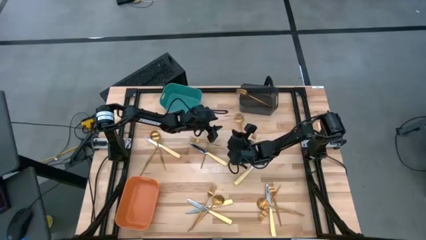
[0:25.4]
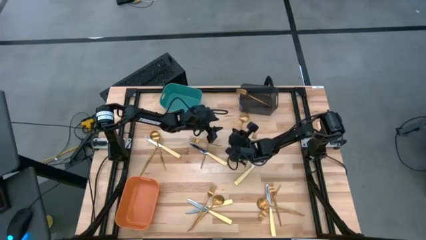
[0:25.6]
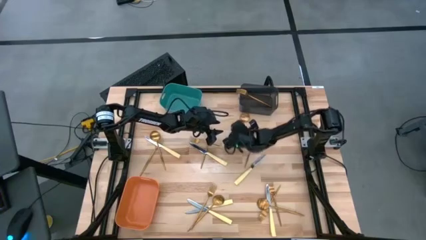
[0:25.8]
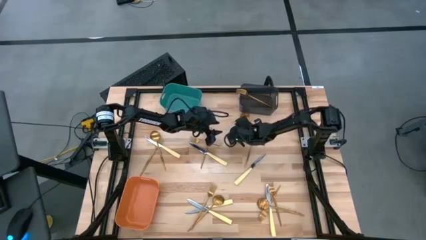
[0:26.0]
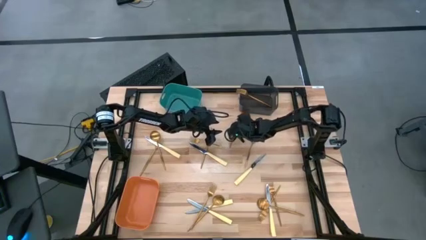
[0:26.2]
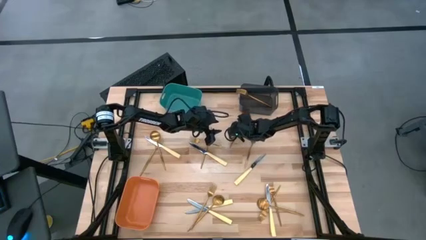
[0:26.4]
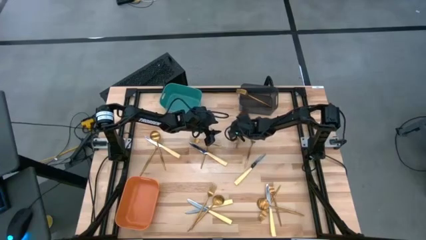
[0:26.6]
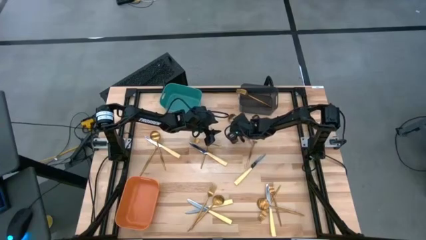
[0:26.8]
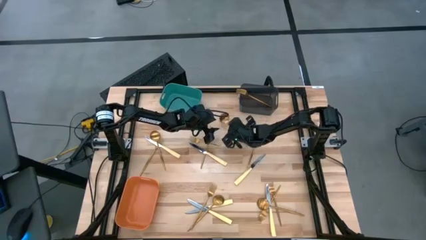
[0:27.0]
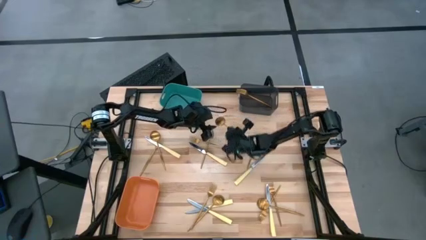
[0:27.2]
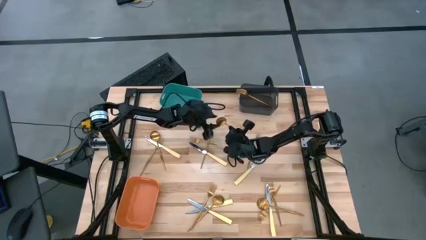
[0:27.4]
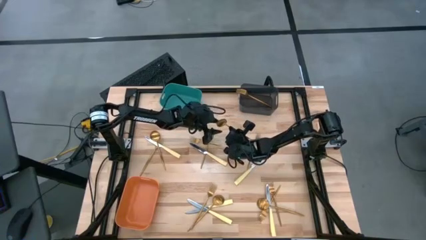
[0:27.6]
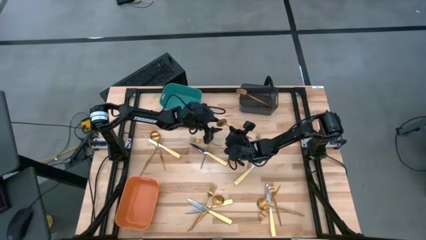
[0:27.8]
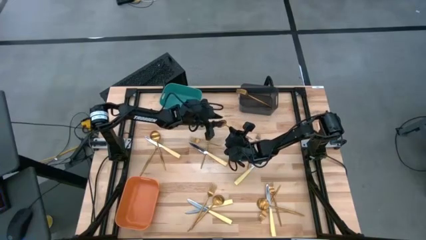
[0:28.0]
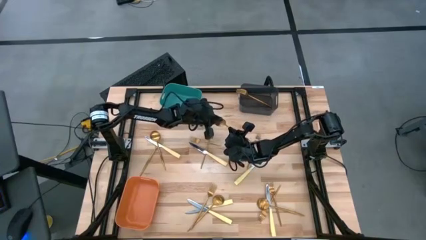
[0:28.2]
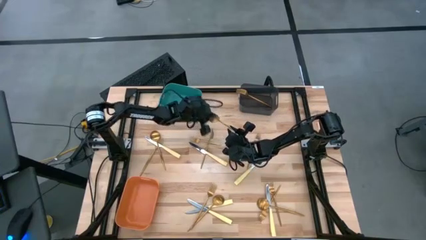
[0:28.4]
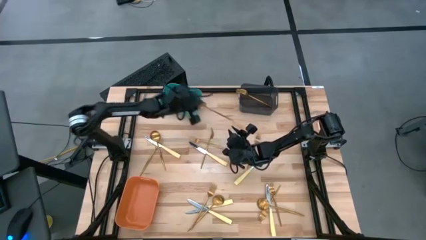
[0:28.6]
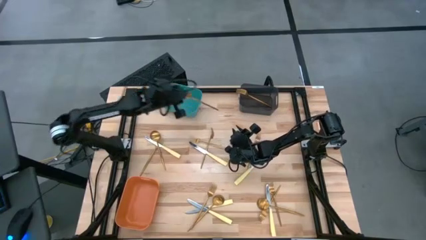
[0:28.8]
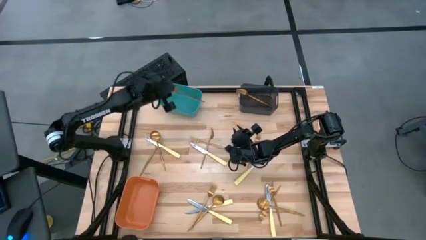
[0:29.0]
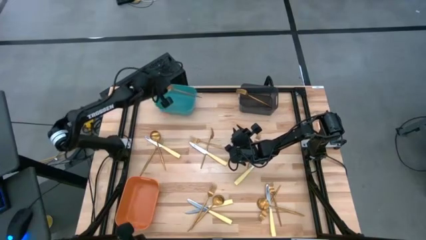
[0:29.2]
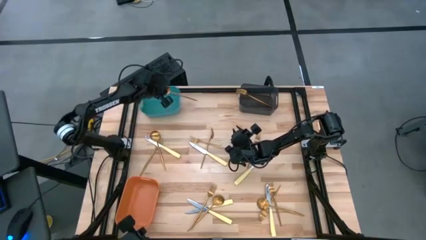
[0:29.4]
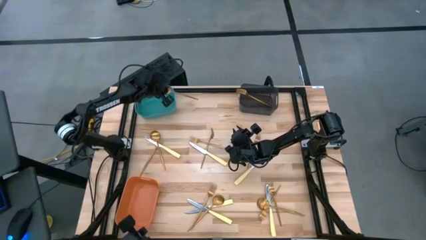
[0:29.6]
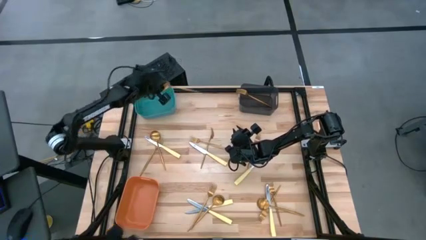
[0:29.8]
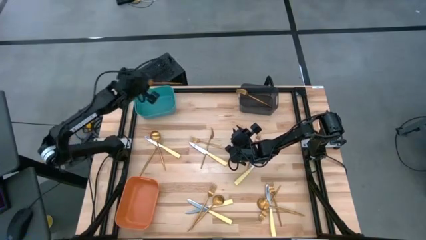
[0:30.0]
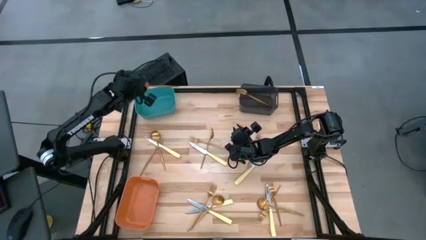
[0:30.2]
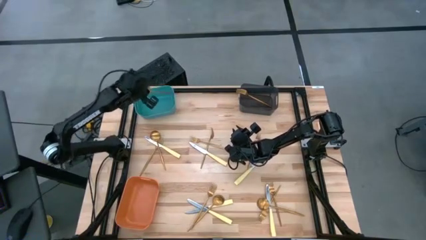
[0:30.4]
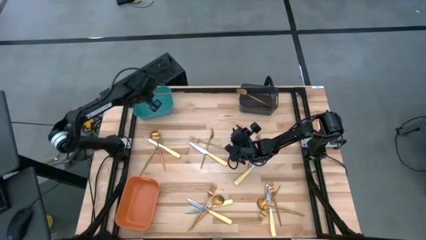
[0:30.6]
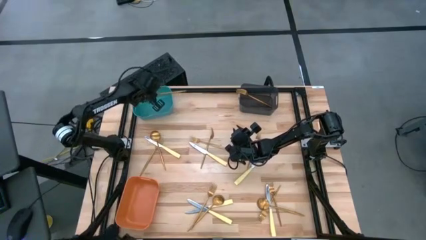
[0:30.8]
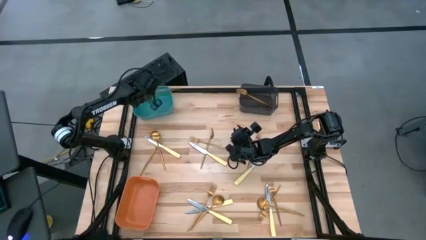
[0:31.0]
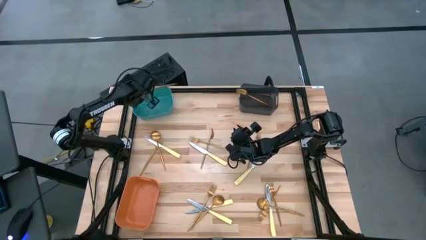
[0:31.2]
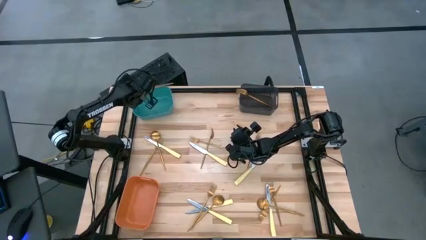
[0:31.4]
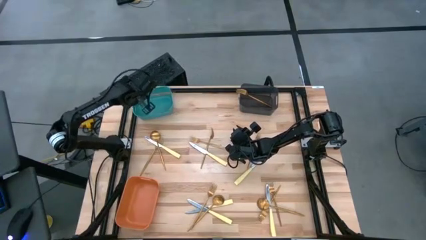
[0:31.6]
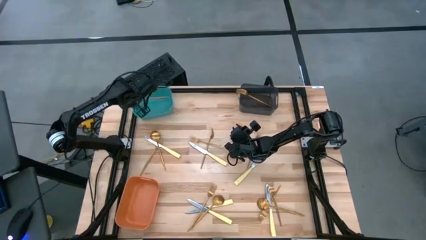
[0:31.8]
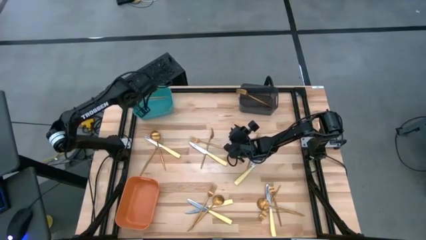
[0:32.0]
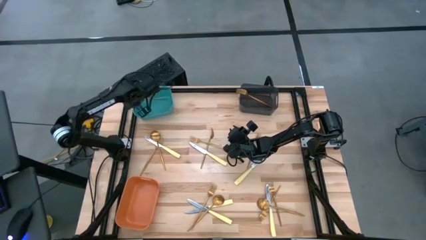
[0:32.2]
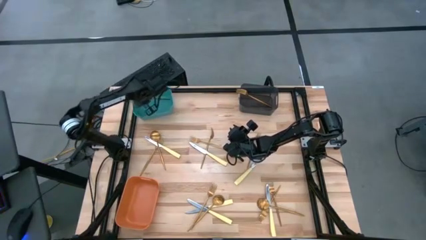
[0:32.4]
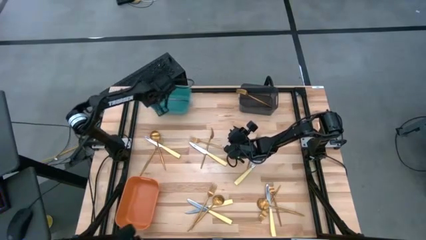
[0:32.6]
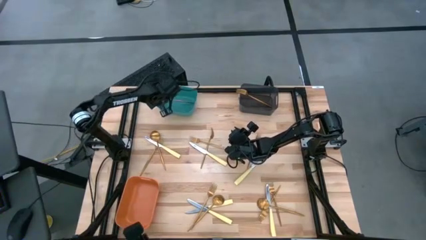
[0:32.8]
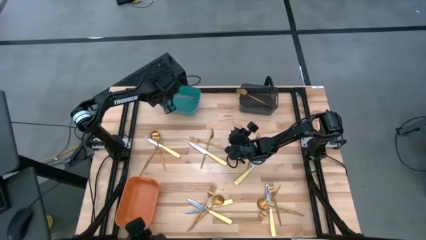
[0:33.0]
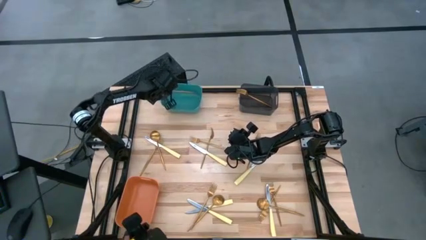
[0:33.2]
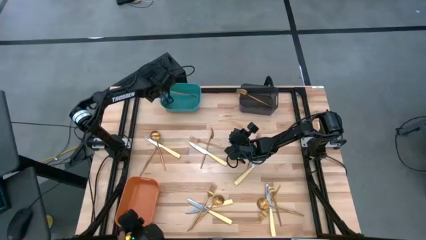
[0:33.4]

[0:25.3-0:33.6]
Task: Sort silverware by color (type)
Put the gold spoon into the green bin

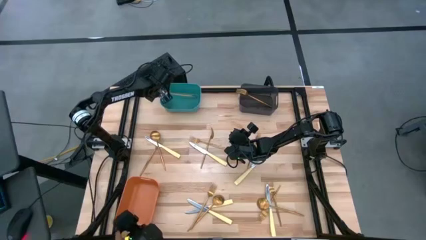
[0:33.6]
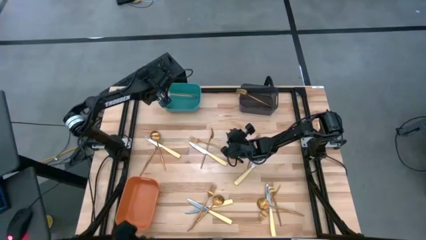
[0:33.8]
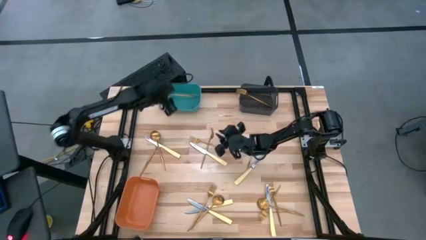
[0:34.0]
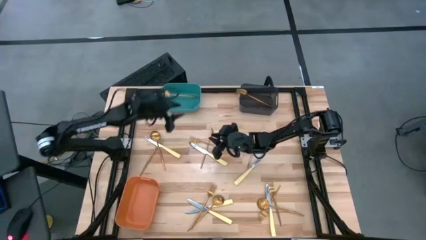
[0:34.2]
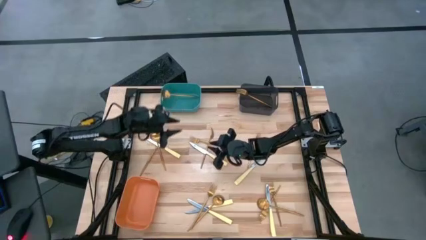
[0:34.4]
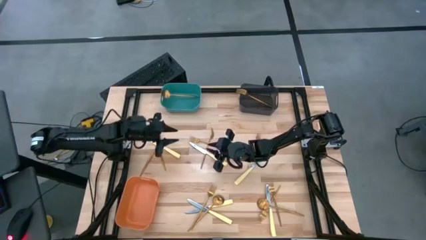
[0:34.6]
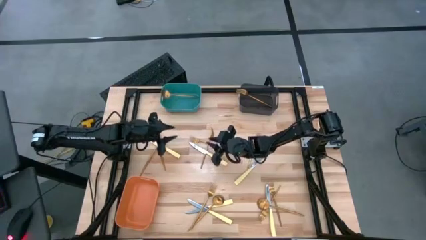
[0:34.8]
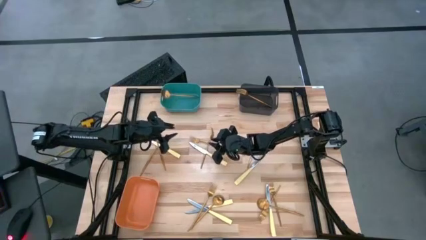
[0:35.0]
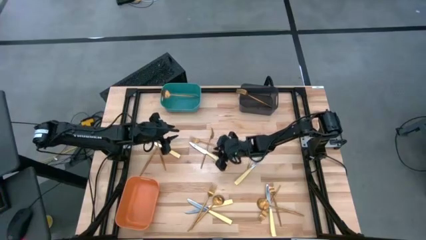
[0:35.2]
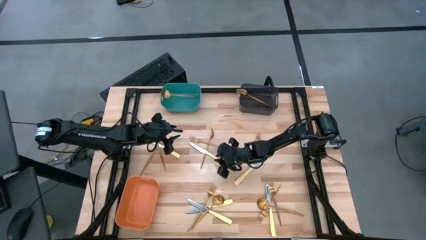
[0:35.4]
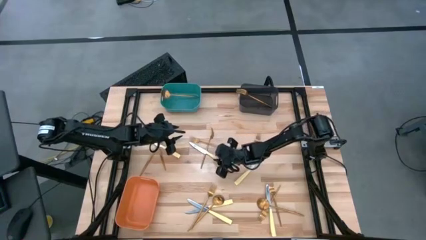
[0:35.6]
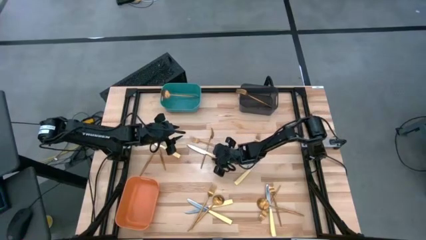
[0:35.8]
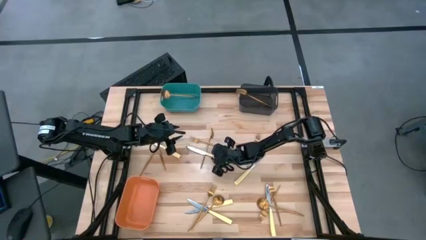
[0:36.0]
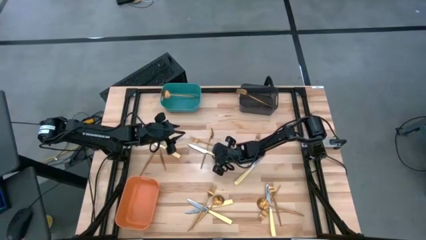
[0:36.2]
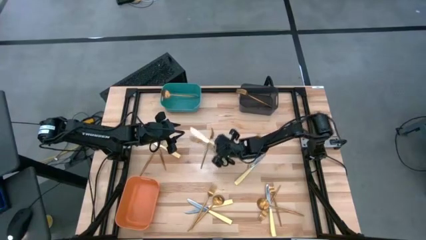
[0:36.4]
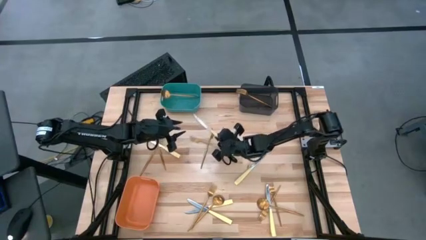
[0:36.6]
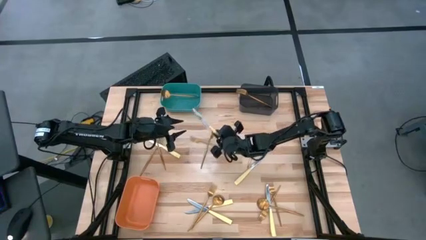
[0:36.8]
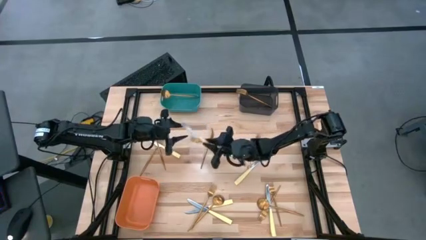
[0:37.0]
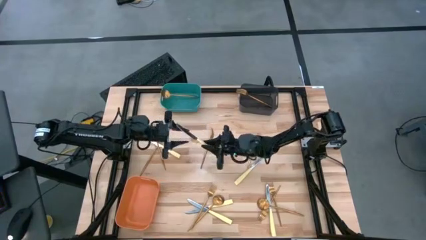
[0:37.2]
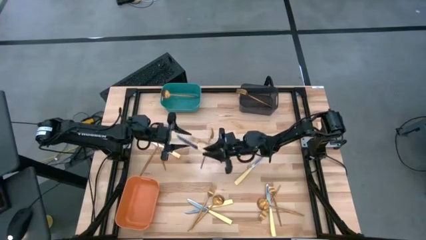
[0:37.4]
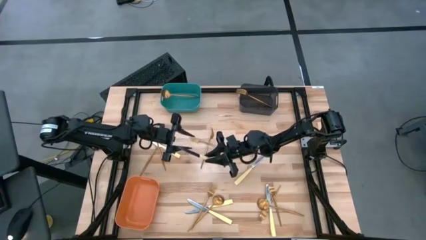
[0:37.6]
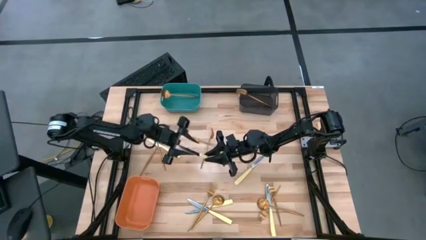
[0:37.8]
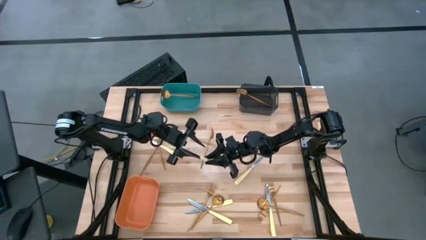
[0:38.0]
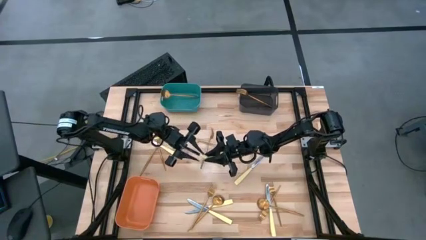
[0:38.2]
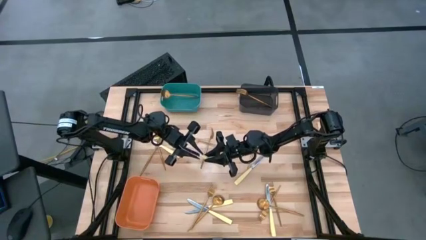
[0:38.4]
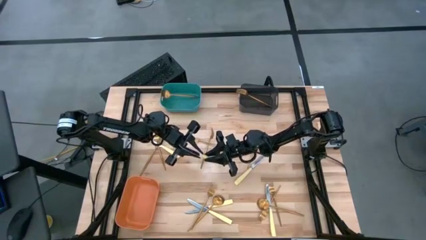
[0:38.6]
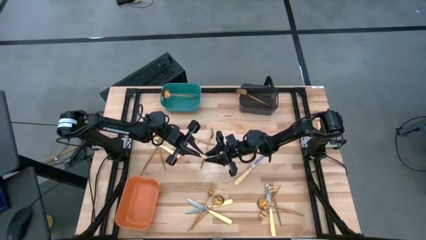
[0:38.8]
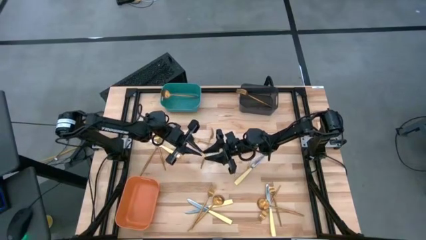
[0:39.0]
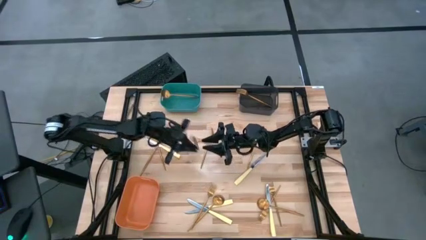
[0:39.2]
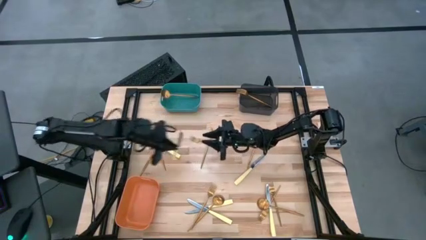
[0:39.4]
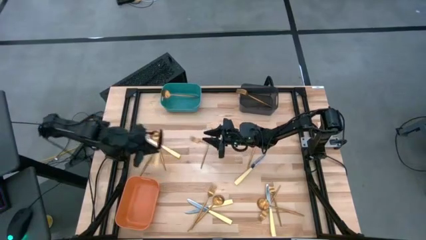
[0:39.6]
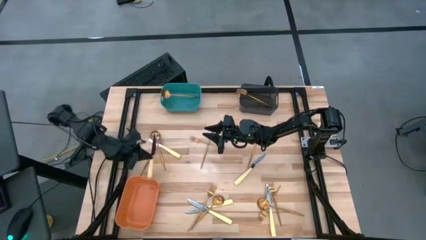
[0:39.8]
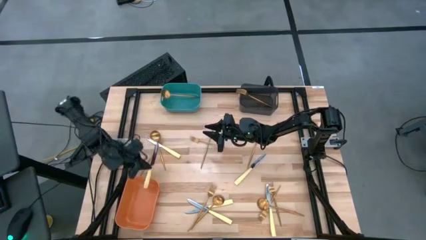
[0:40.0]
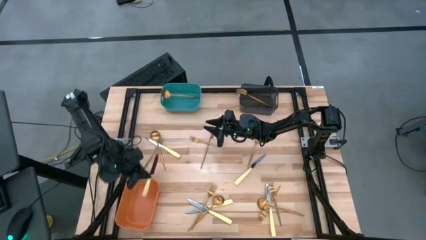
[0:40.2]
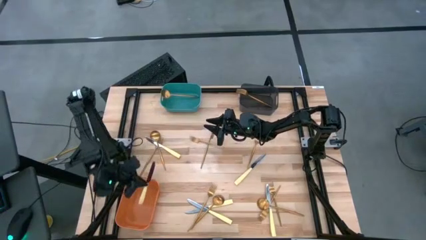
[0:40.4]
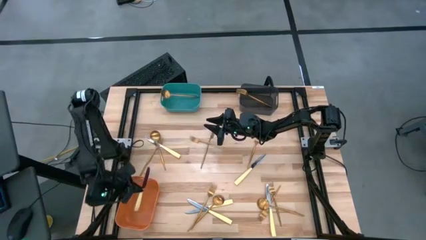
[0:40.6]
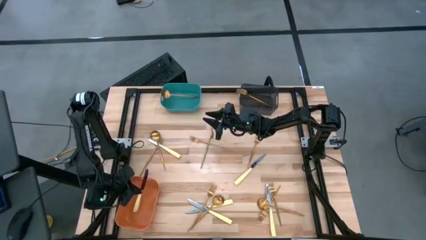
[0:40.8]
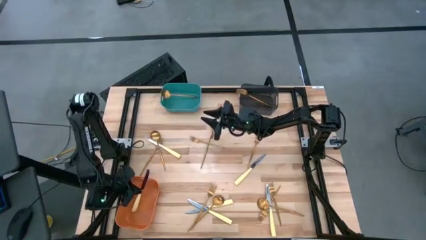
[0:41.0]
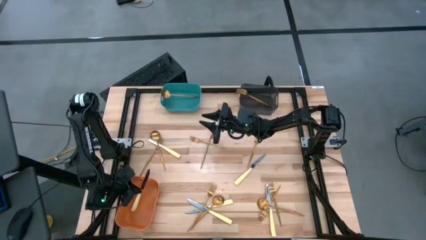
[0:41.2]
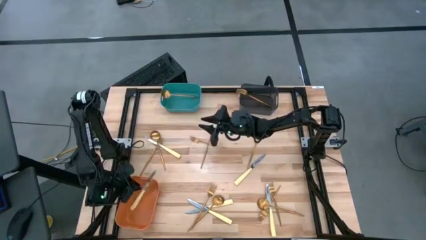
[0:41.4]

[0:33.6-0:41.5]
Put the yellow table knife into the orange bin
